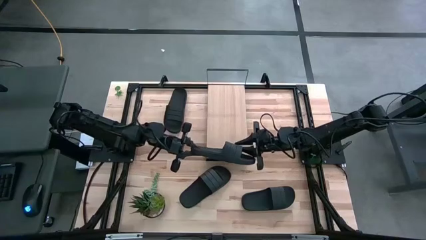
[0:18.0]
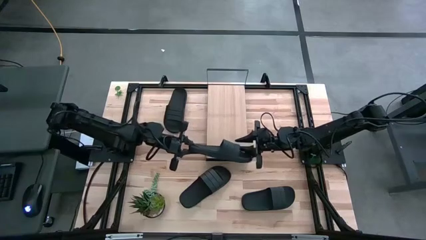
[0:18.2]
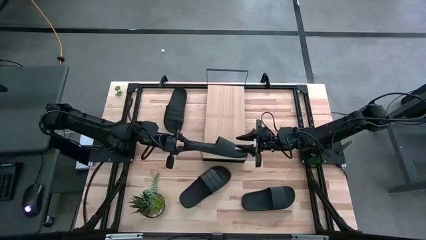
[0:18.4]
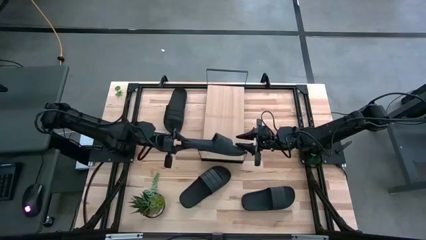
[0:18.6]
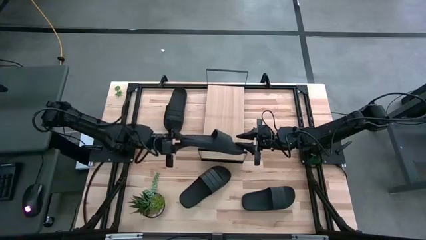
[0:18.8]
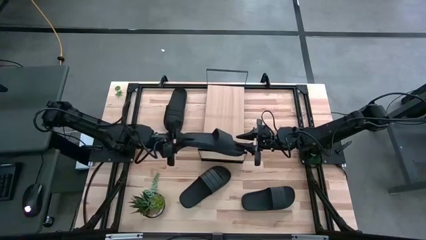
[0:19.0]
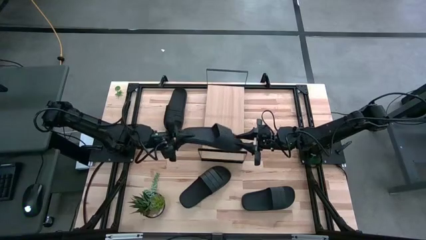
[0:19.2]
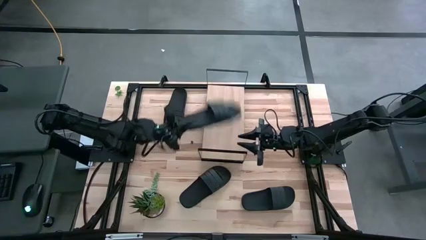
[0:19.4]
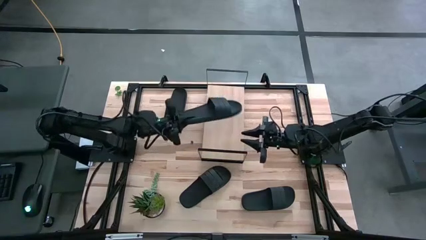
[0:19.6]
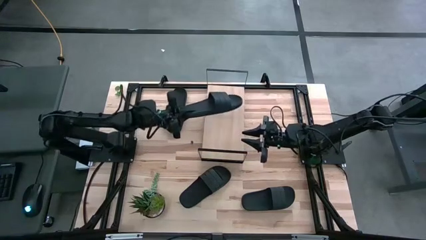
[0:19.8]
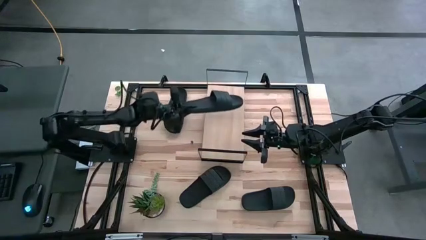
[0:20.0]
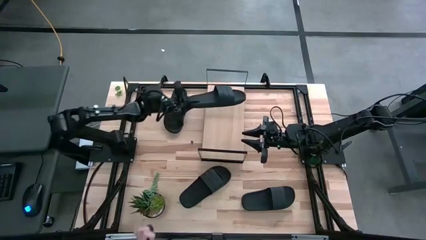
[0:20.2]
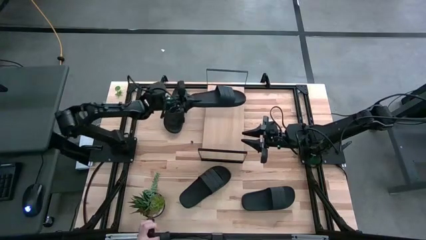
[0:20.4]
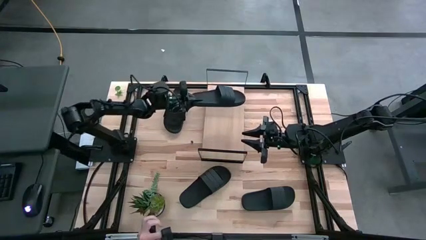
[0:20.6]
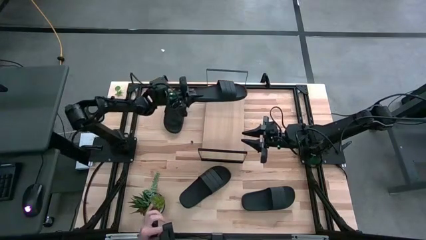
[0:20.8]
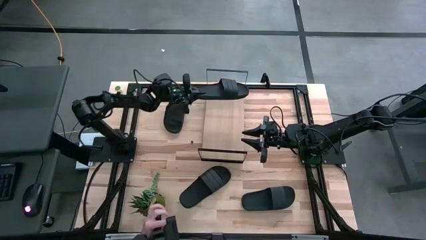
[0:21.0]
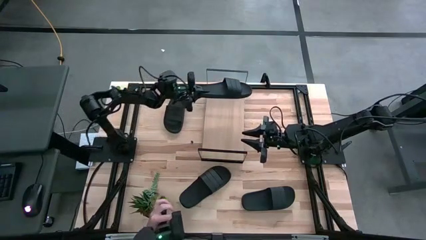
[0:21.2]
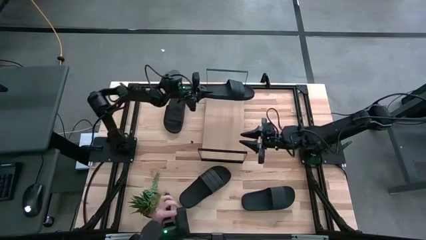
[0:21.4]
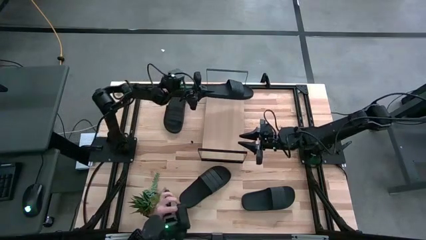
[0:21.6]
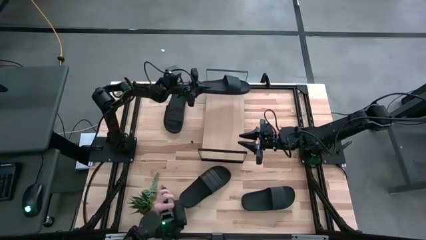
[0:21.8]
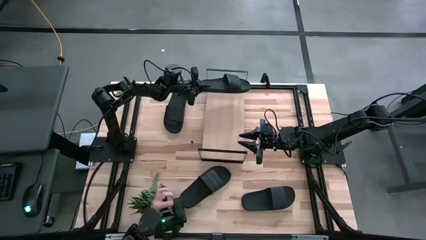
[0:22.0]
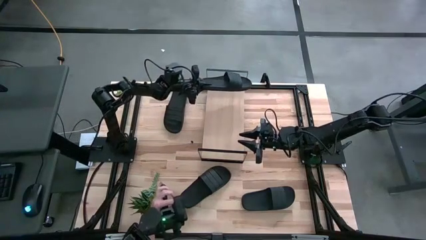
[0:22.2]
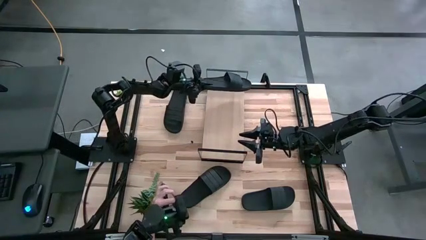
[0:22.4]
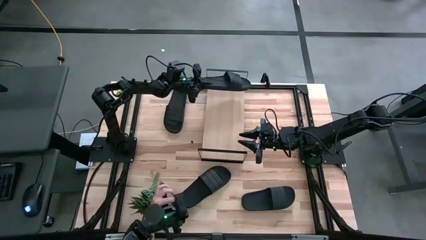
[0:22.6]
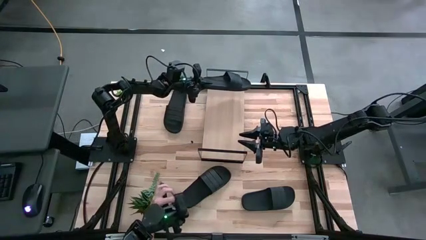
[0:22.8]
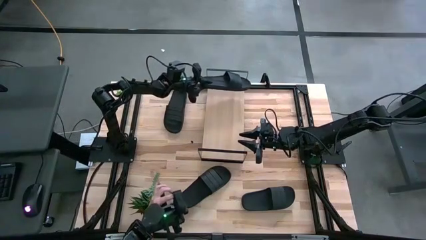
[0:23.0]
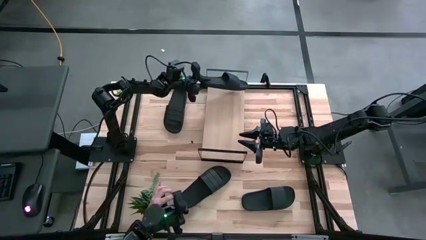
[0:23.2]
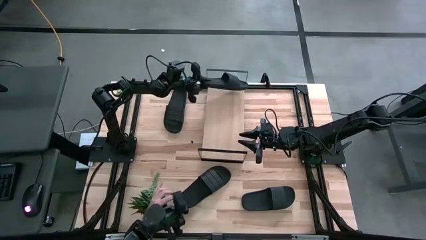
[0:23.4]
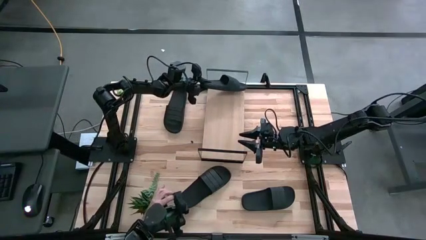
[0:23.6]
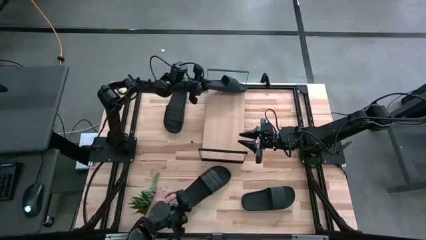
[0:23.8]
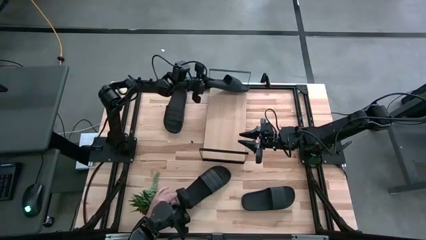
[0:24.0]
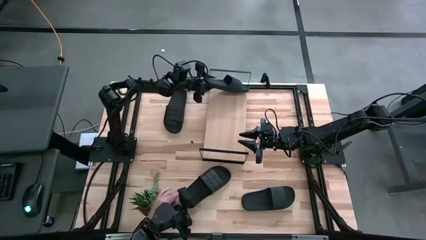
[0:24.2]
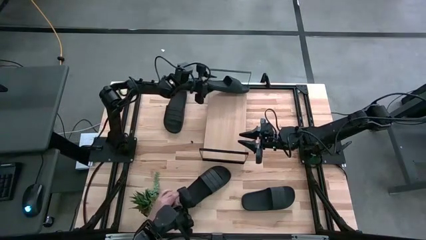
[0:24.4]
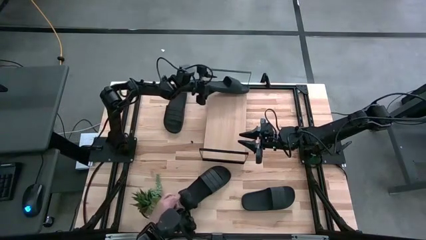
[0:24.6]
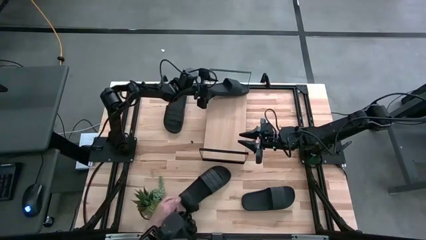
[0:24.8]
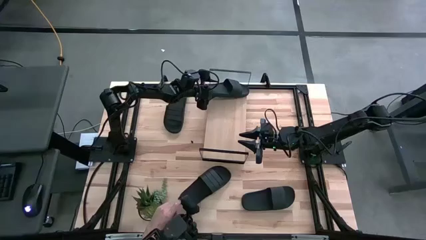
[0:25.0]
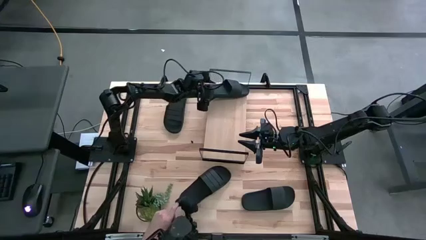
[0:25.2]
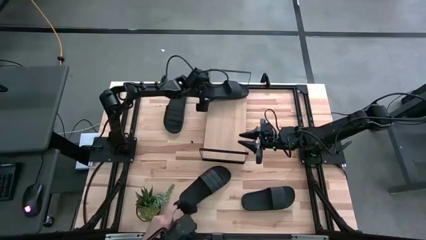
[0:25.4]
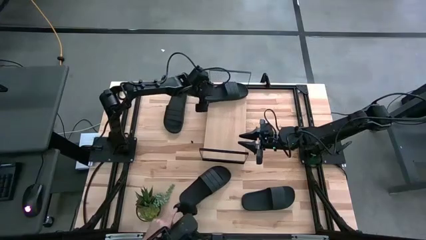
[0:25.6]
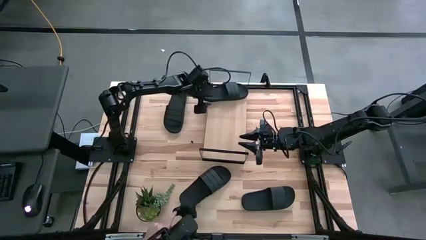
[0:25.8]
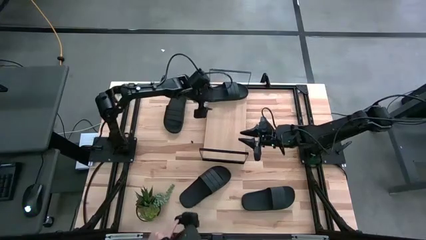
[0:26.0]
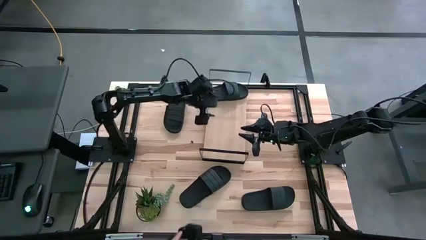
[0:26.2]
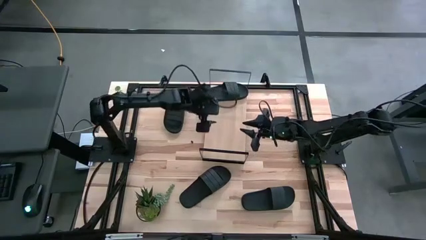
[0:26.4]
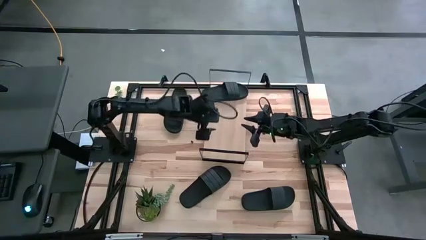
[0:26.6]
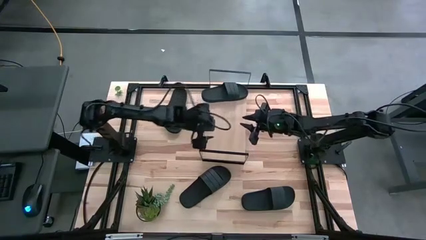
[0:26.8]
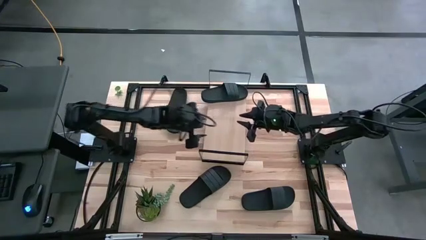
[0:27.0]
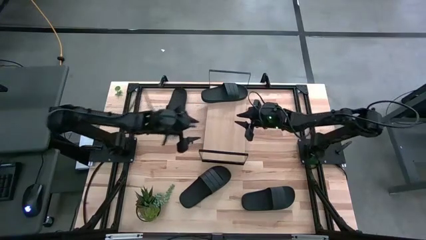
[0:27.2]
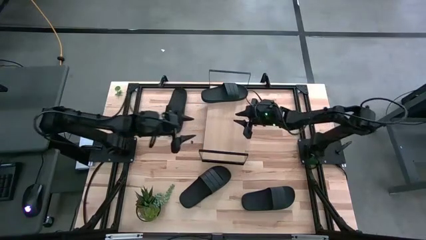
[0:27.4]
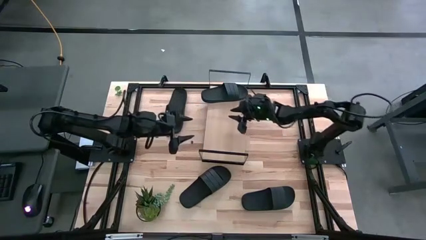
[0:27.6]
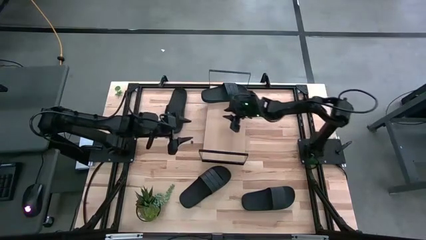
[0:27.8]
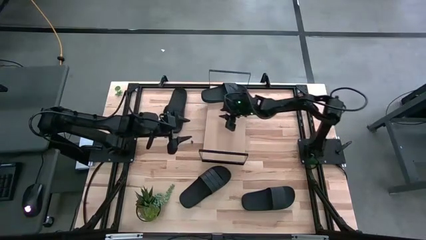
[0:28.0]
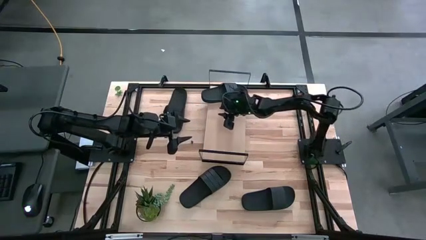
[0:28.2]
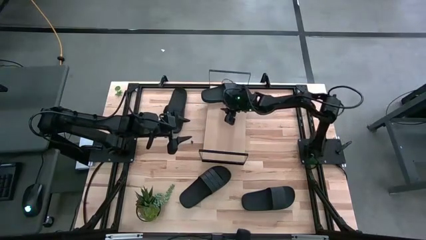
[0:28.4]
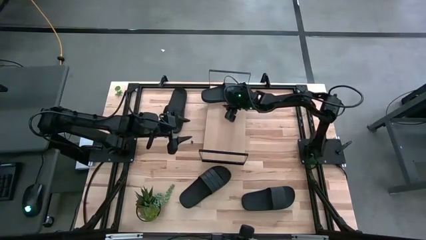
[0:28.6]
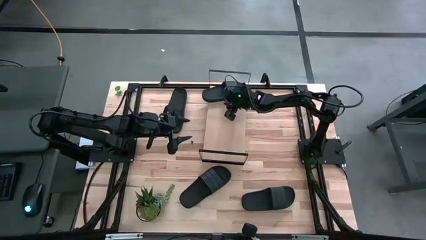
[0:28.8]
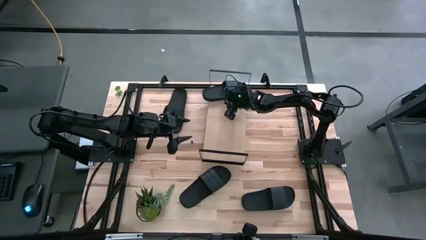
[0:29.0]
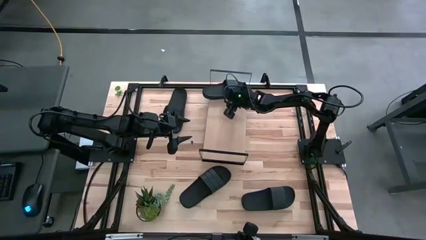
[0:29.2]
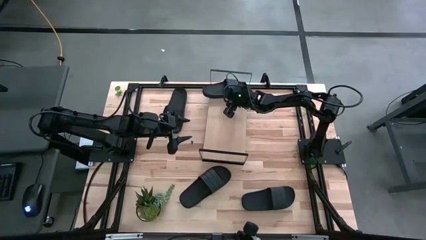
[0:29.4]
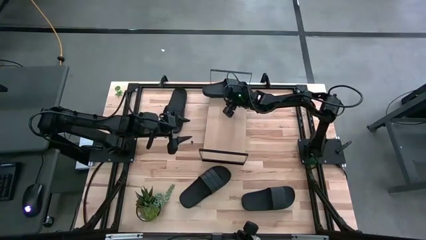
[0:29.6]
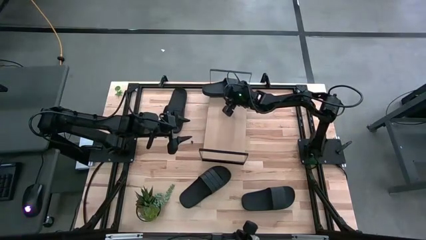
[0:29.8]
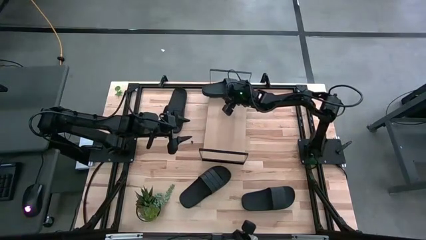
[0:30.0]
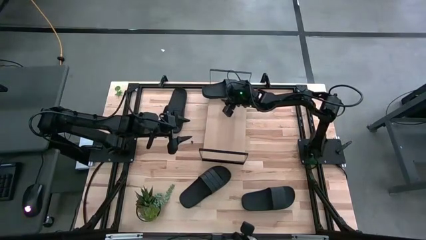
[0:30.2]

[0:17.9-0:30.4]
Task: Pick and place slides into the shelf
Put the top right black slide on the shelf
